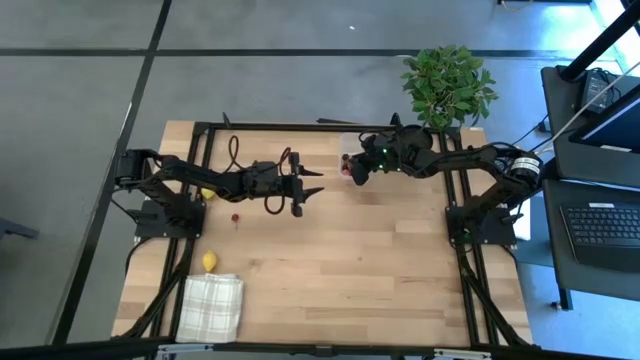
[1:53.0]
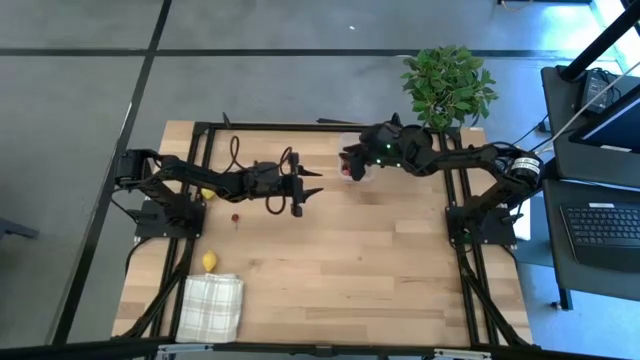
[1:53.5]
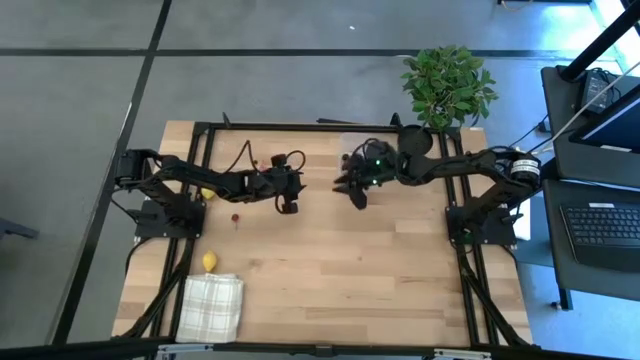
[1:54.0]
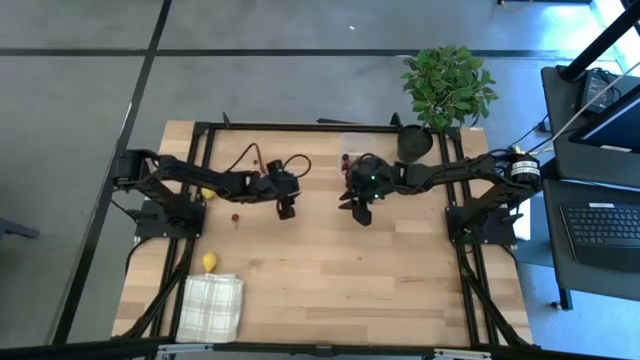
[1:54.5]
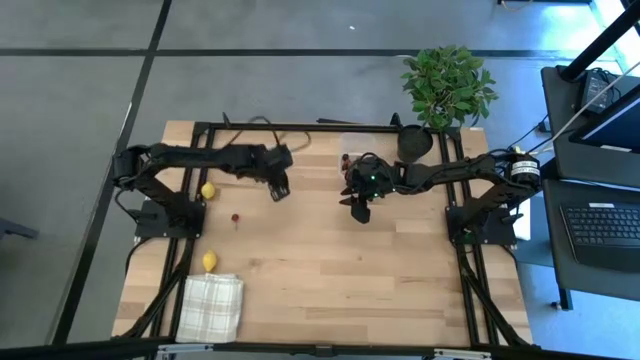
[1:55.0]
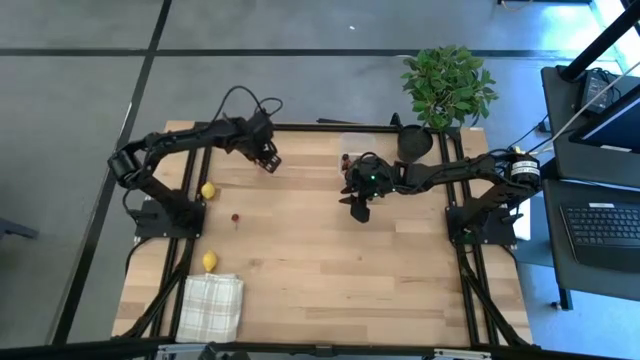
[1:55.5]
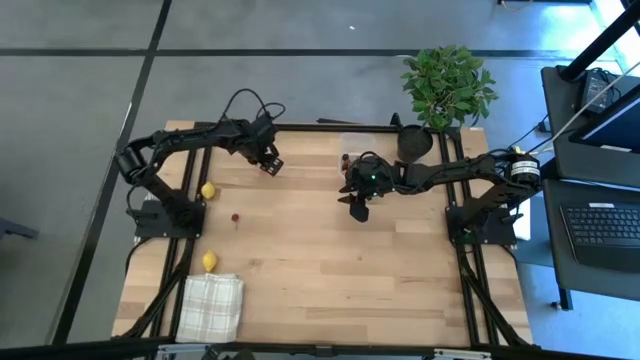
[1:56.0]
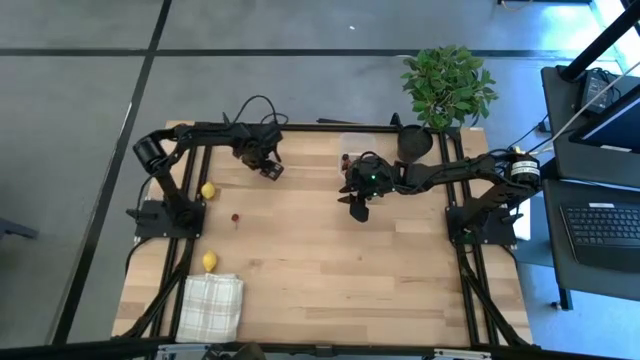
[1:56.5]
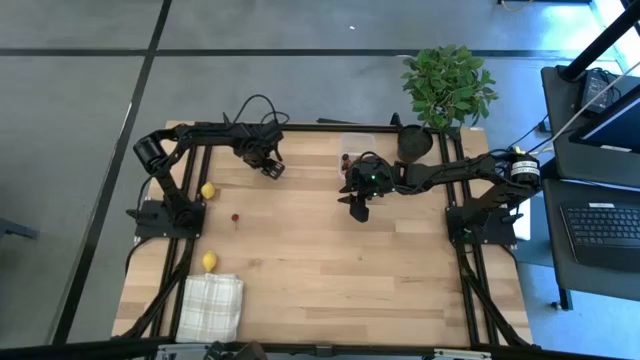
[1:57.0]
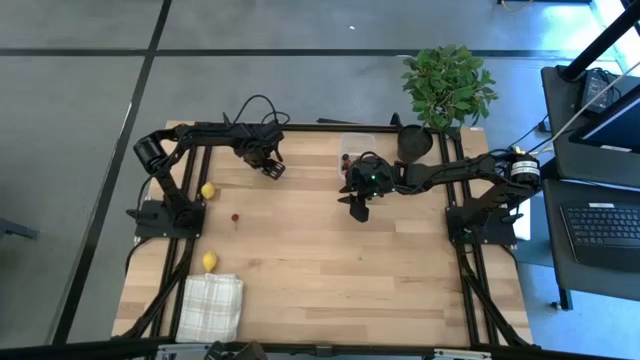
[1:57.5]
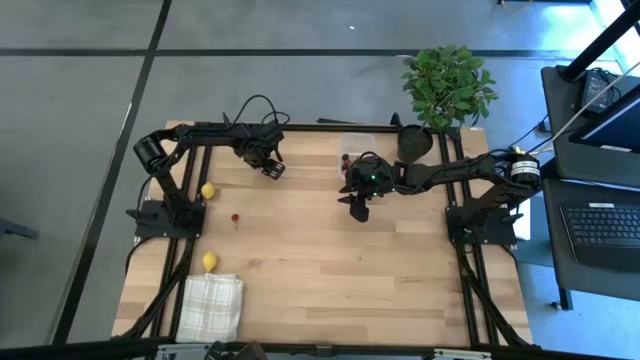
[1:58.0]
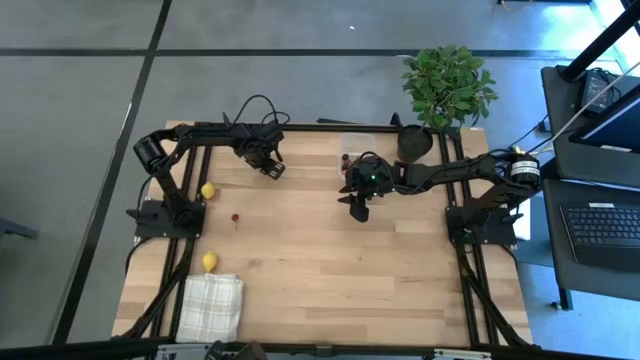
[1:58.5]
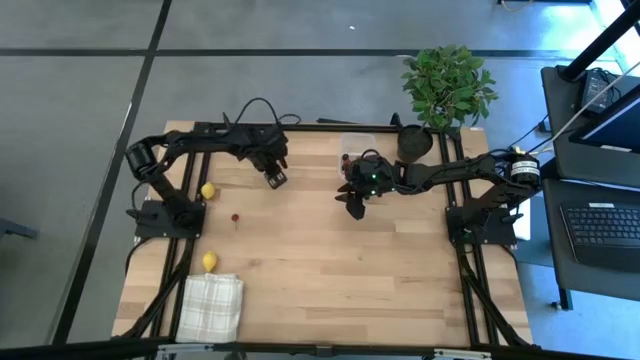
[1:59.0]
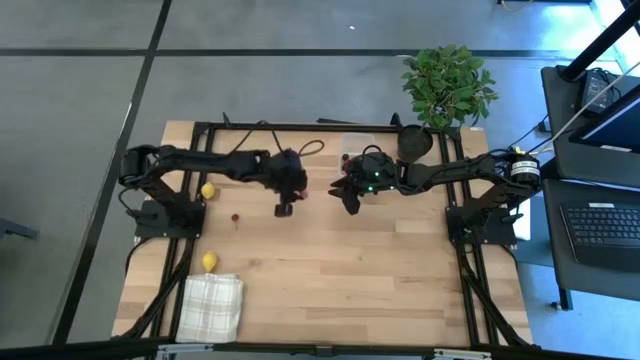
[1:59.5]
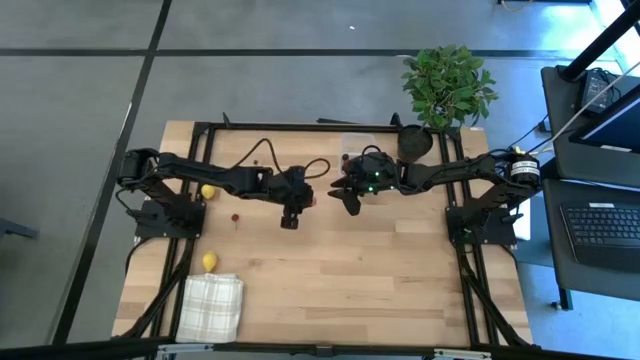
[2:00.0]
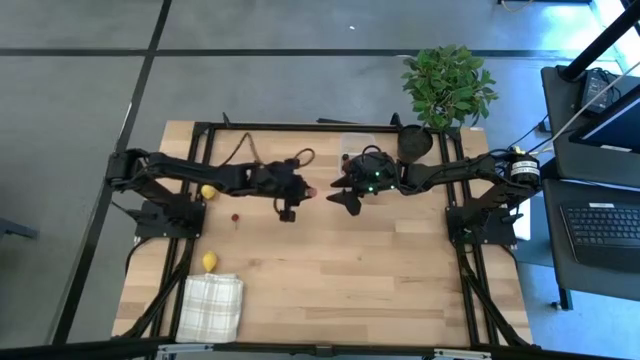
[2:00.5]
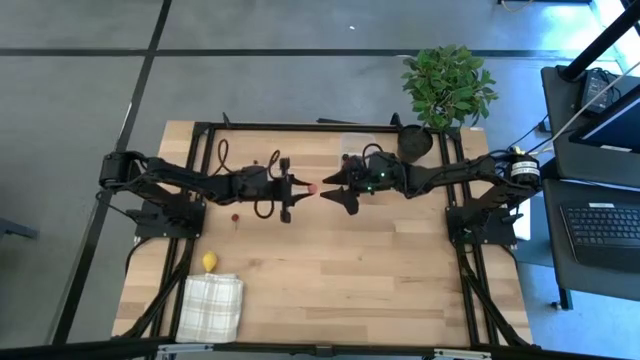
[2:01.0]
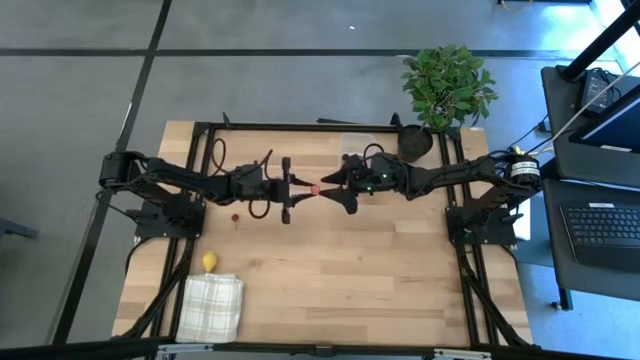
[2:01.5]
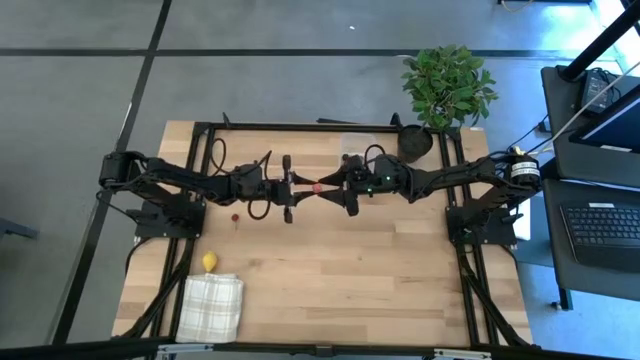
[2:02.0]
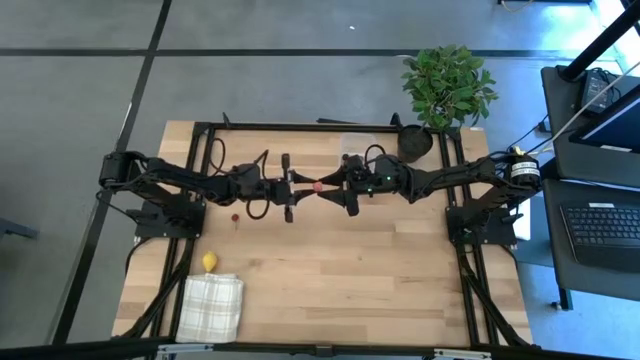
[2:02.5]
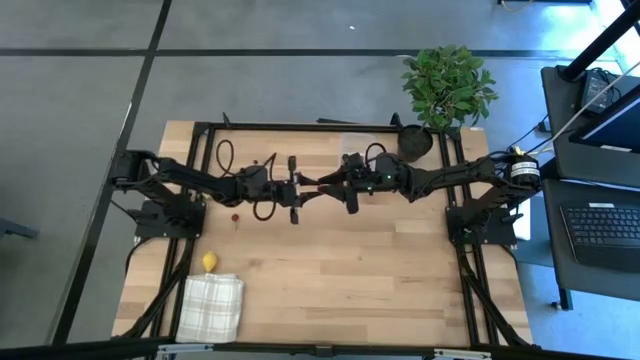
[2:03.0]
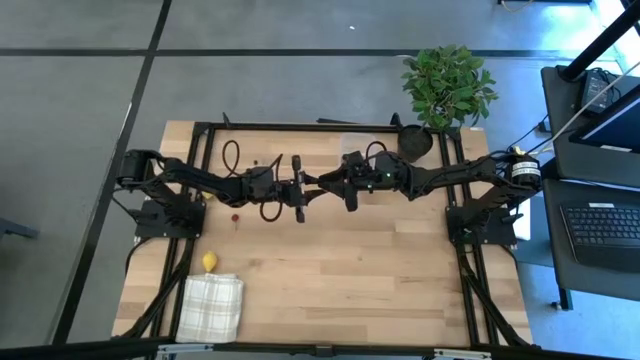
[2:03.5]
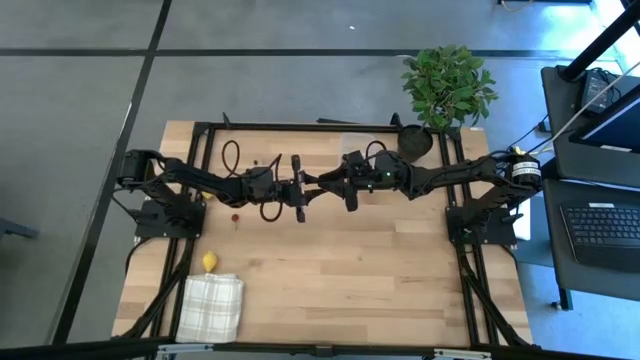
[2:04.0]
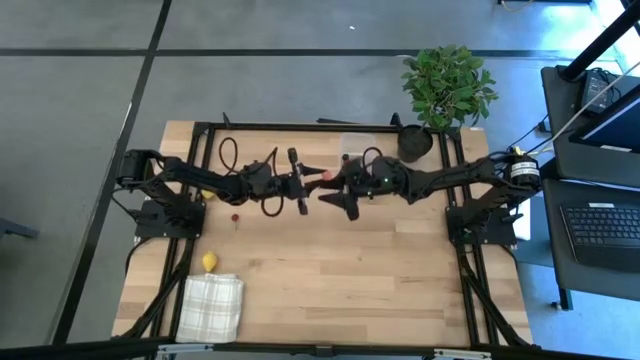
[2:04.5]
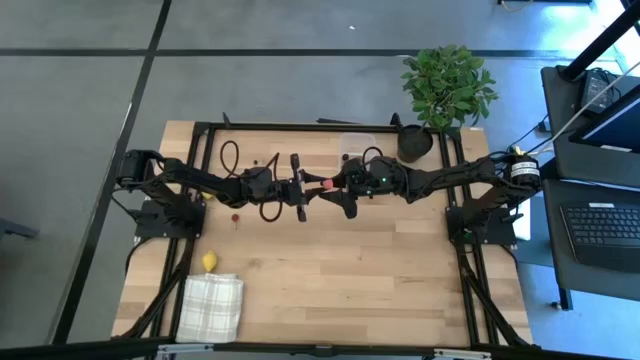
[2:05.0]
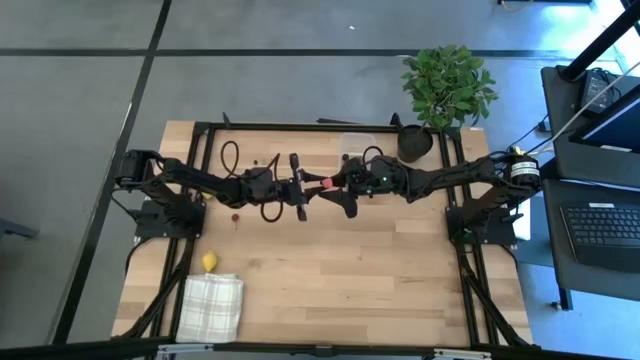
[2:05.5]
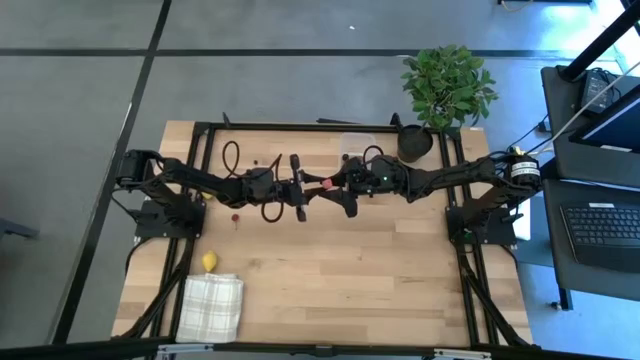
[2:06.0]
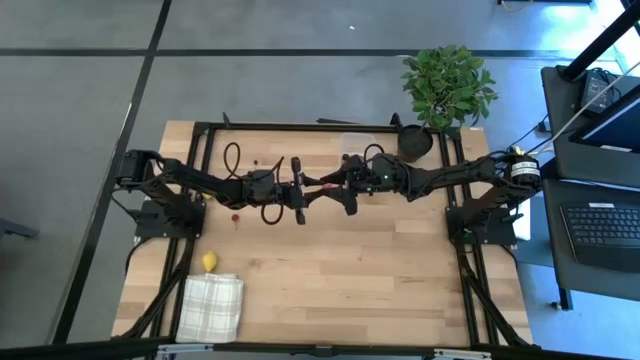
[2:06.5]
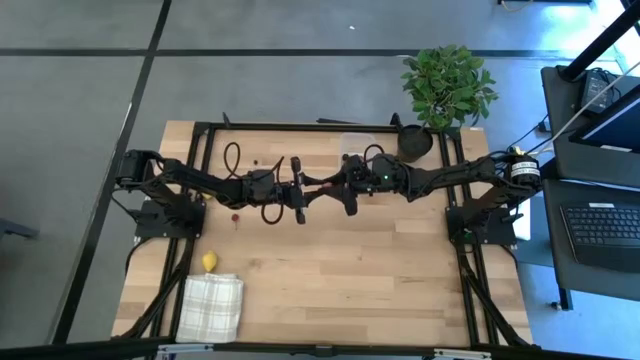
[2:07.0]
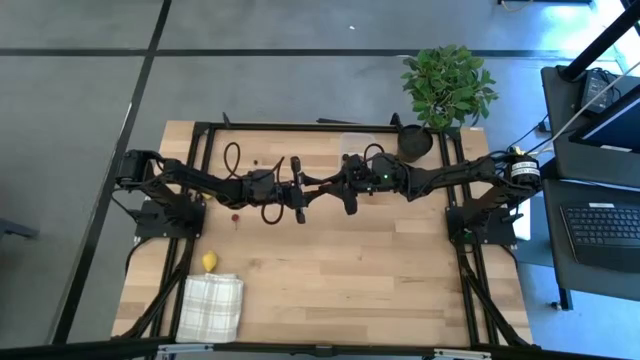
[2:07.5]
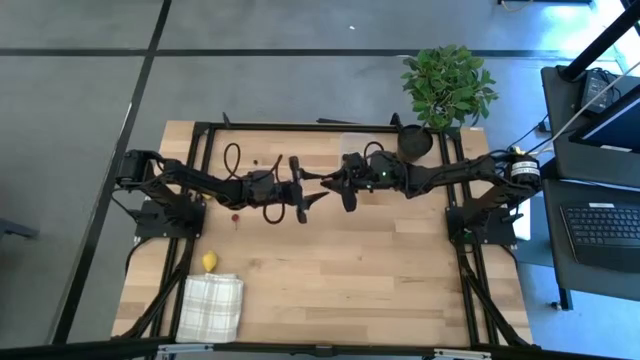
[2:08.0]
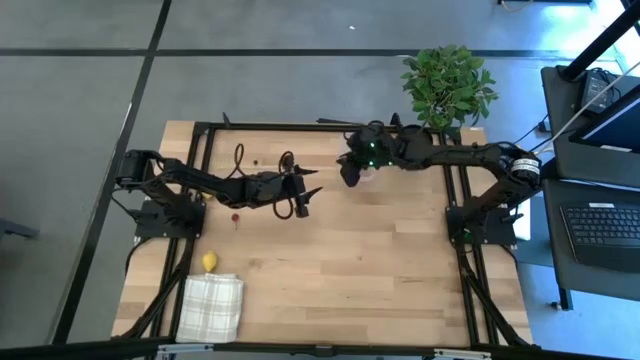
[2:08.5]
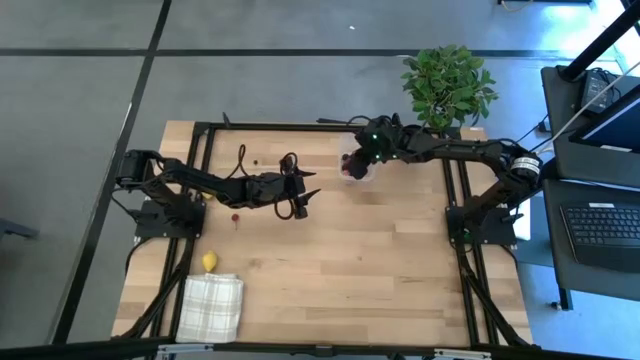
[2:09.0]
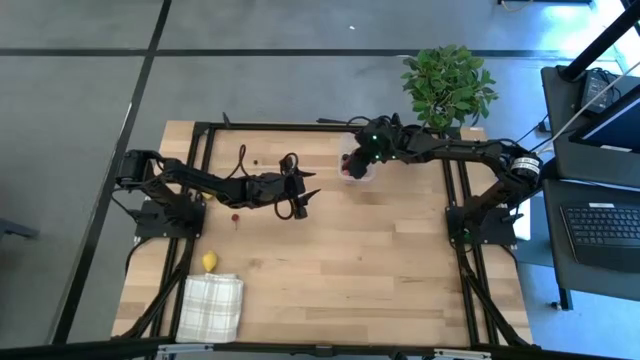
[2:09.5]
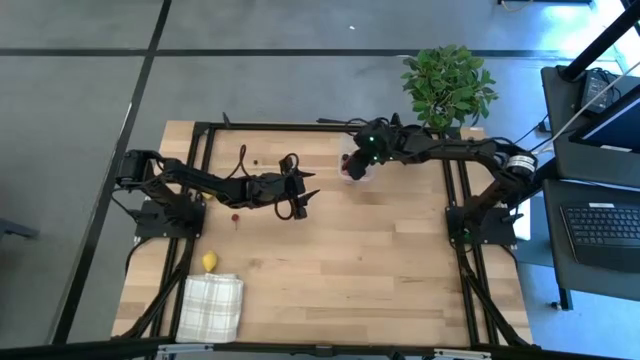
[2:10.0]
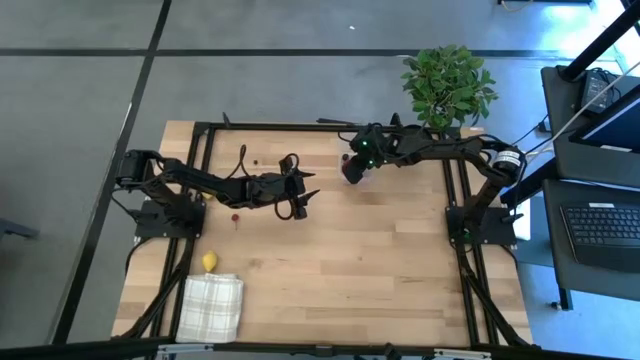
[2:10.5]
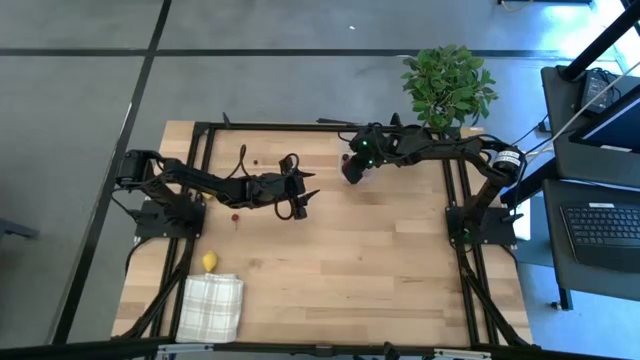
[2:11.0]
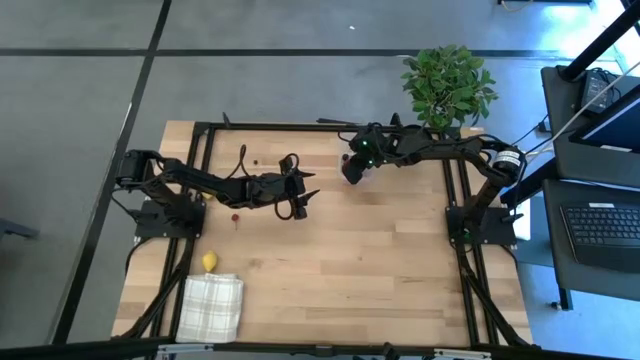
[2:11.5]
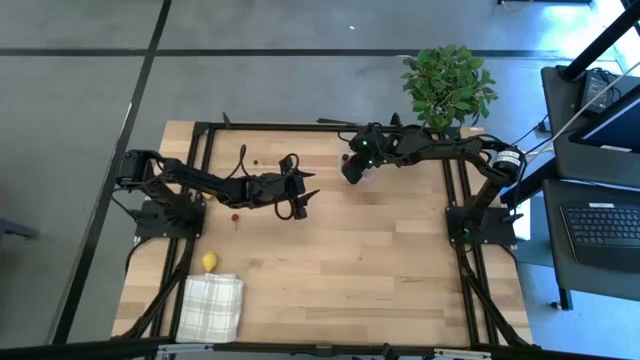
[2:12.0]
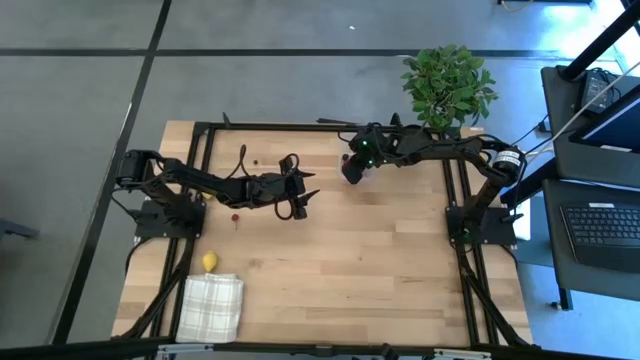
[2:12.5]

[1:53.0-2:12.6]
Task: Pick and placing Produce into tupperware
Put the peach into the transparent bin

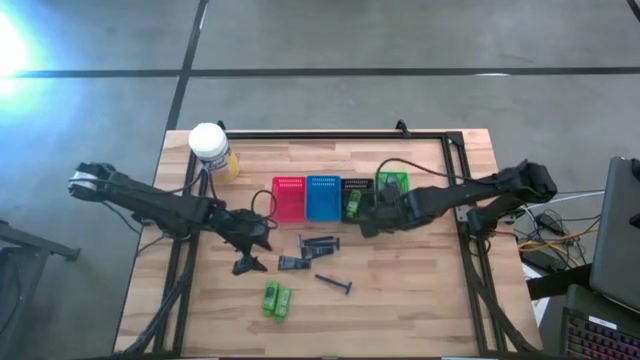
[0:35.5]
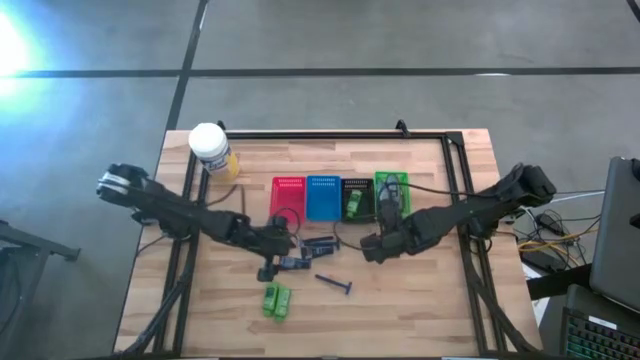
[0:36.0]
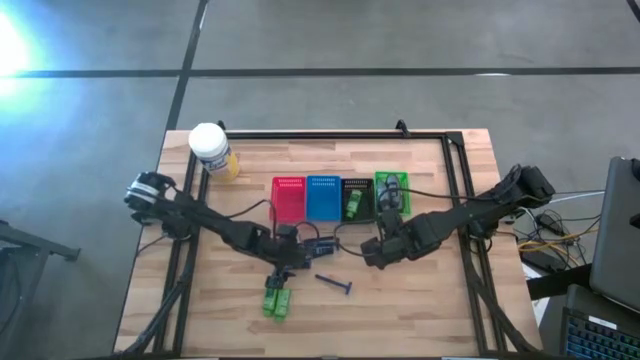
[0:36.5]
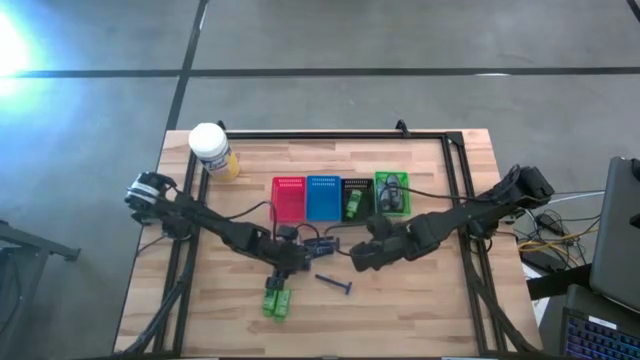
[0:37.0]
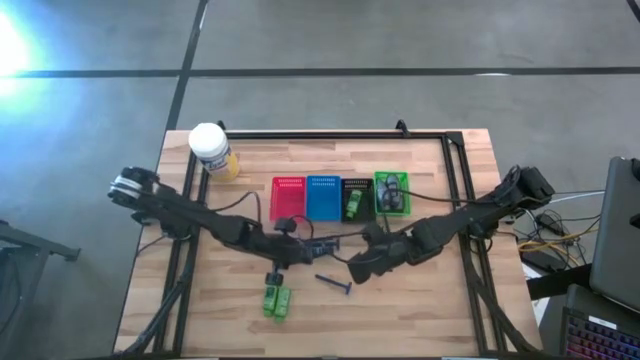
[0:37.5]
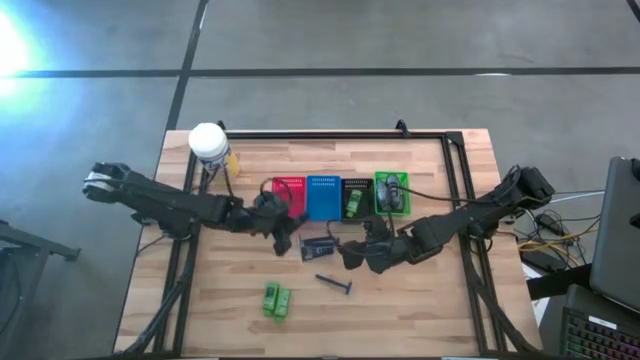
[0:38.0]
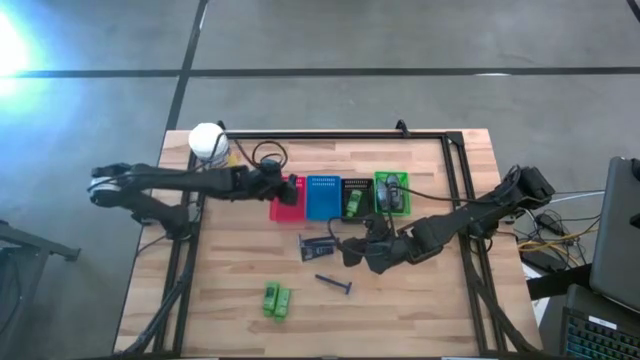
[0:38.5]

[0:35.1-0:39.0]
Task: Pick & Place Travel size toiletries
Put the shave cream into the red basket
